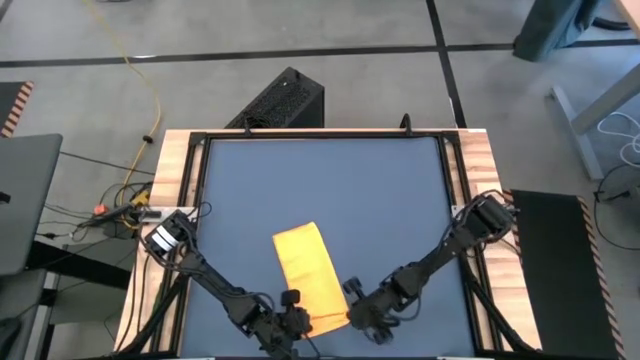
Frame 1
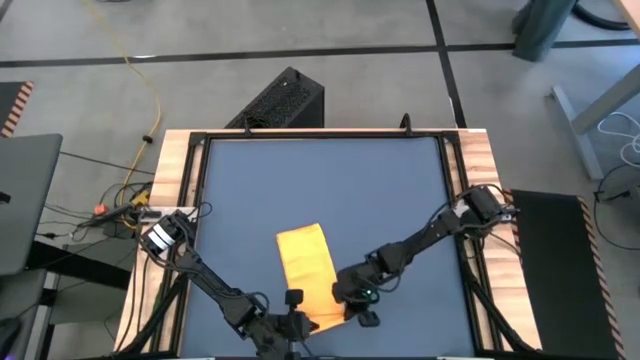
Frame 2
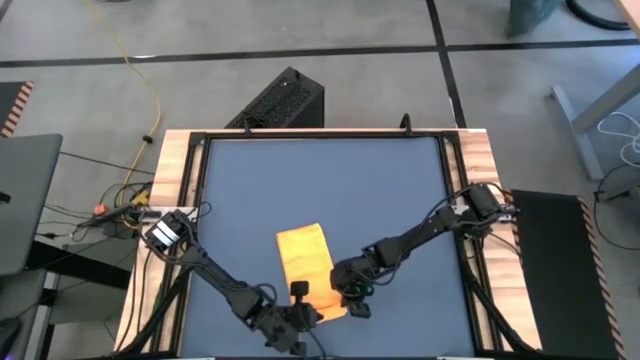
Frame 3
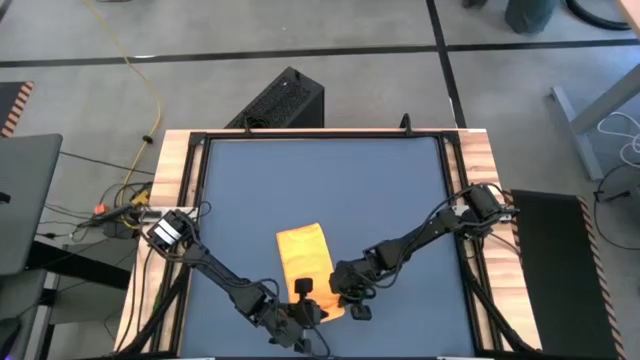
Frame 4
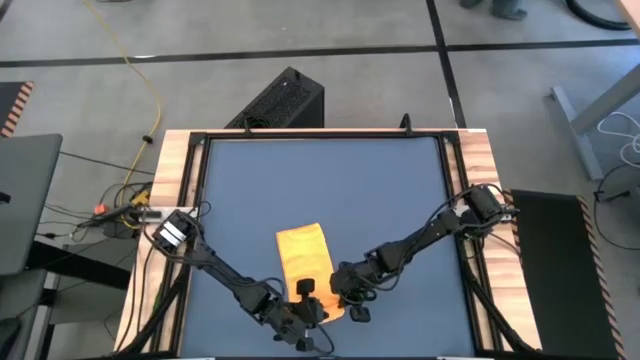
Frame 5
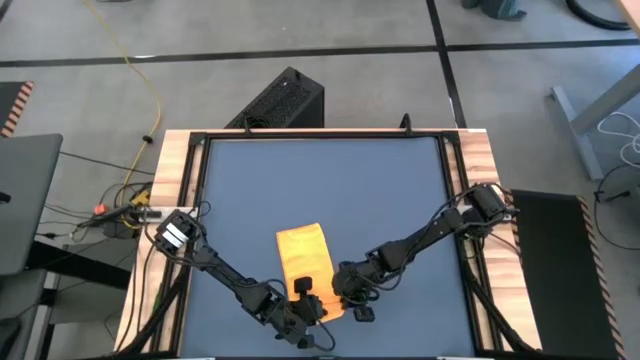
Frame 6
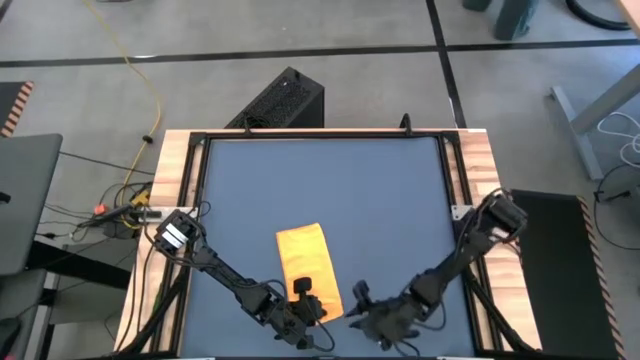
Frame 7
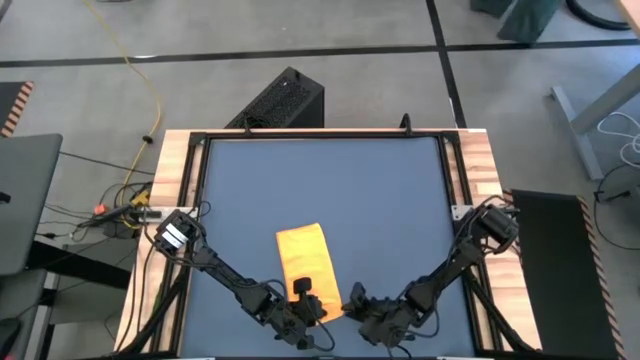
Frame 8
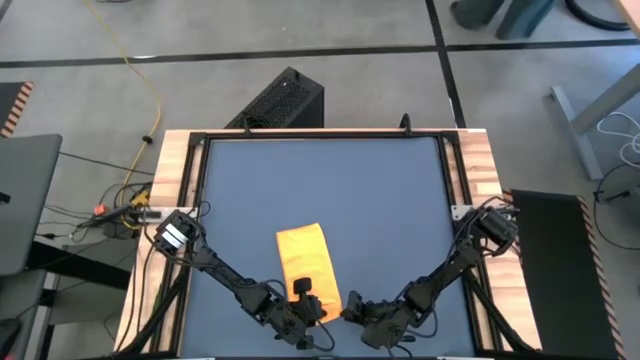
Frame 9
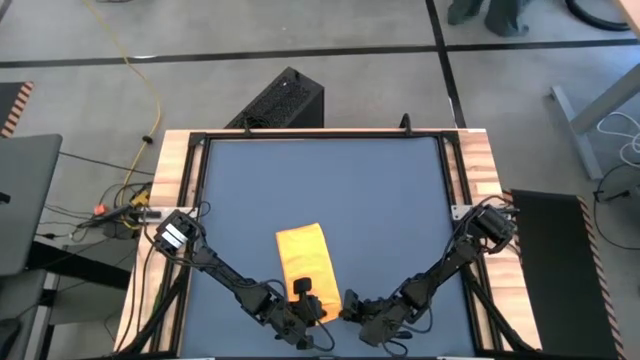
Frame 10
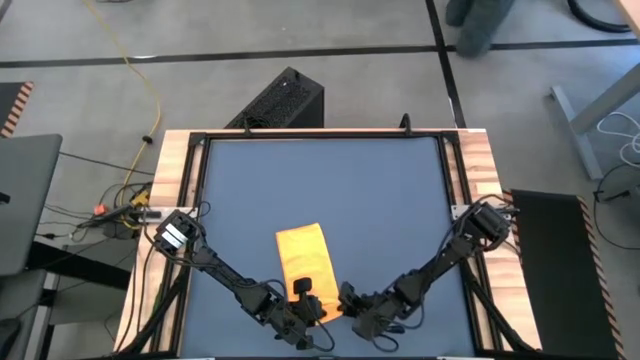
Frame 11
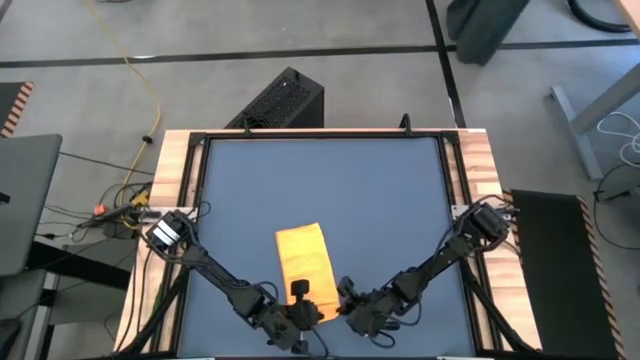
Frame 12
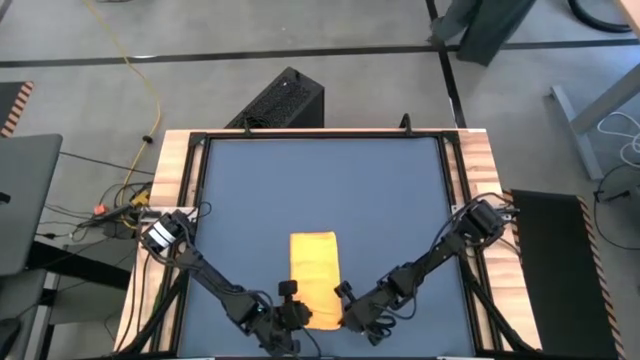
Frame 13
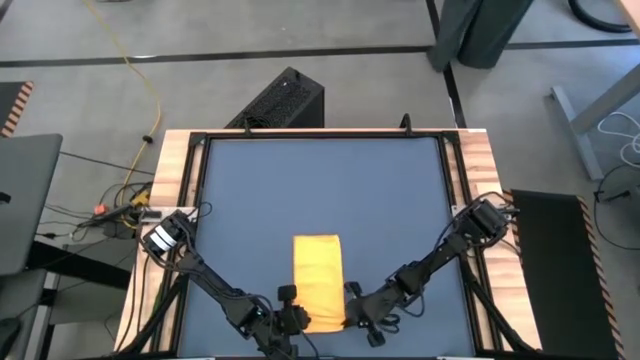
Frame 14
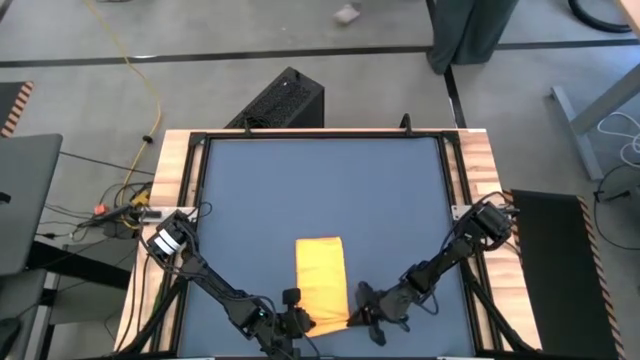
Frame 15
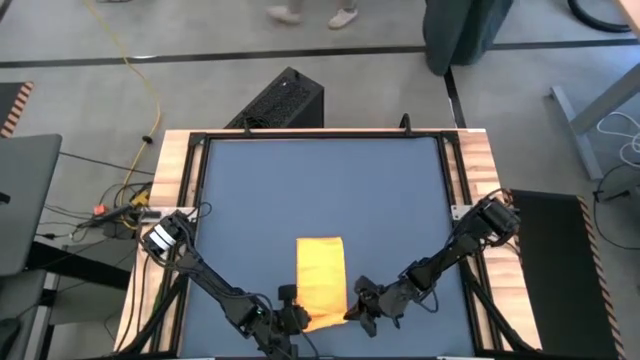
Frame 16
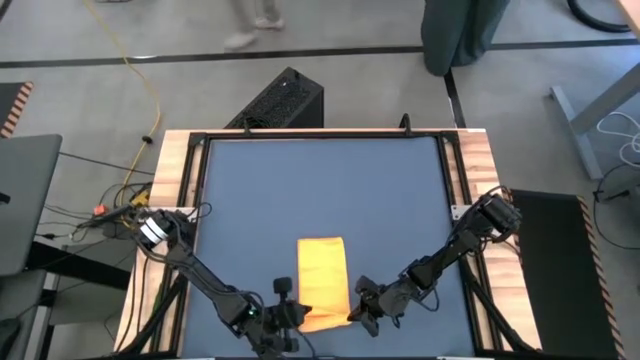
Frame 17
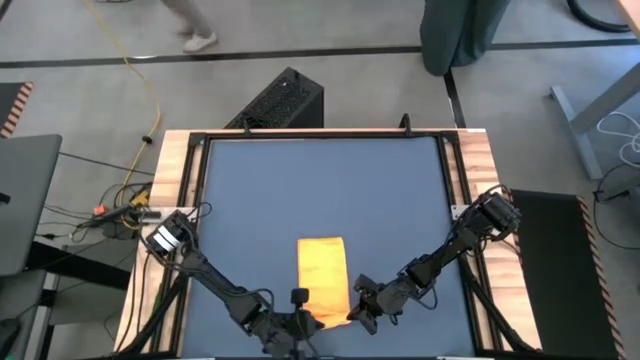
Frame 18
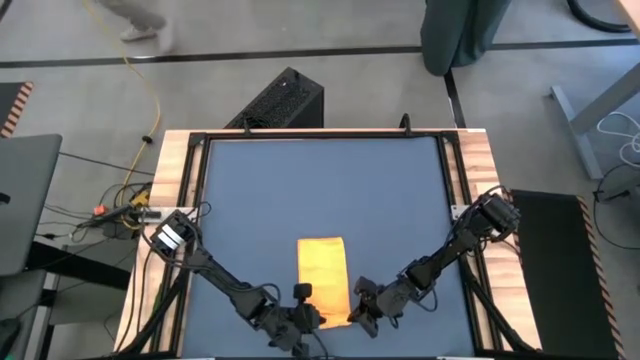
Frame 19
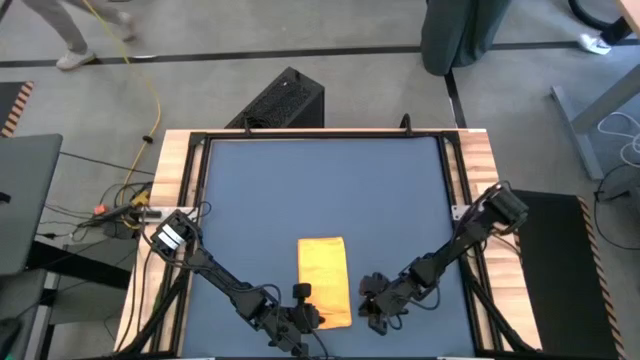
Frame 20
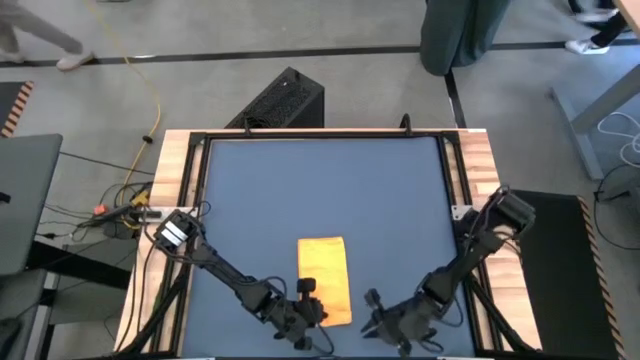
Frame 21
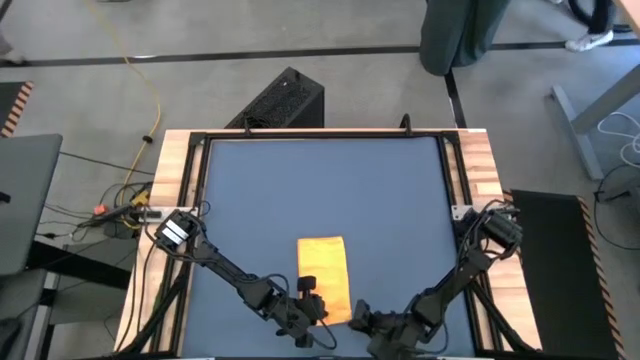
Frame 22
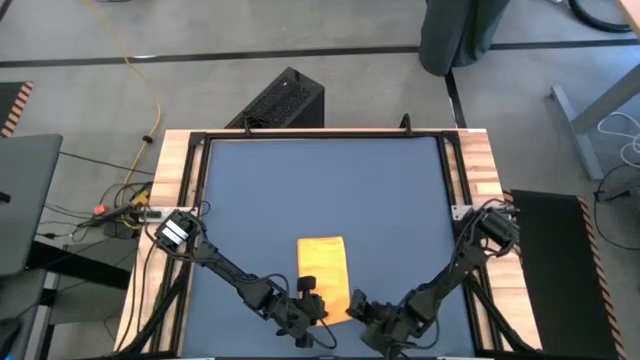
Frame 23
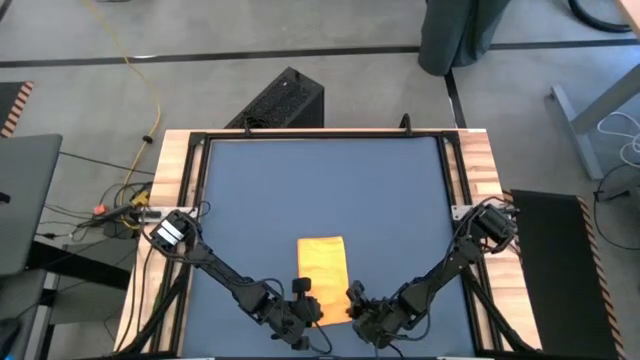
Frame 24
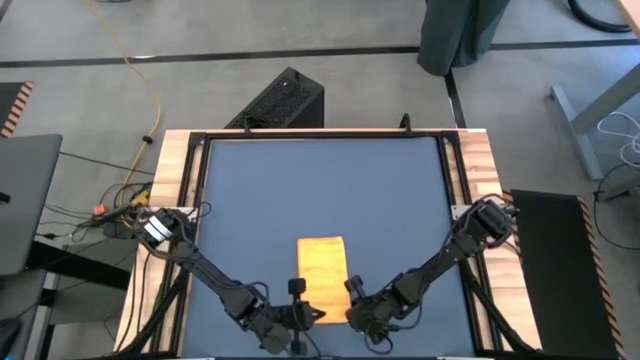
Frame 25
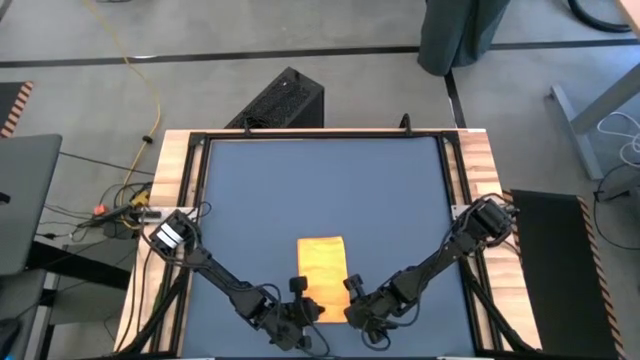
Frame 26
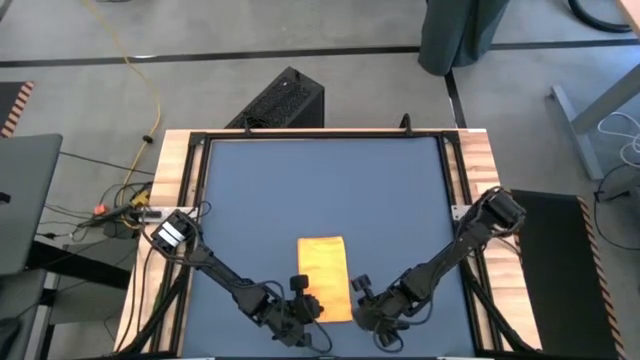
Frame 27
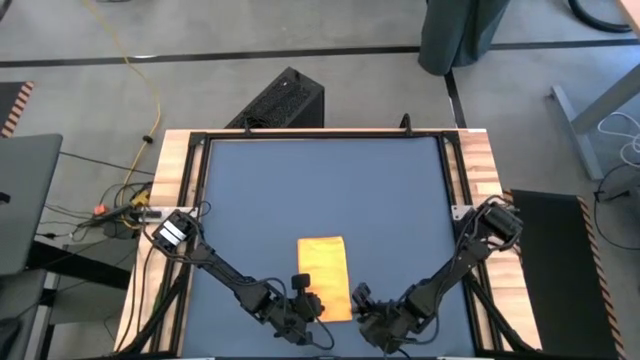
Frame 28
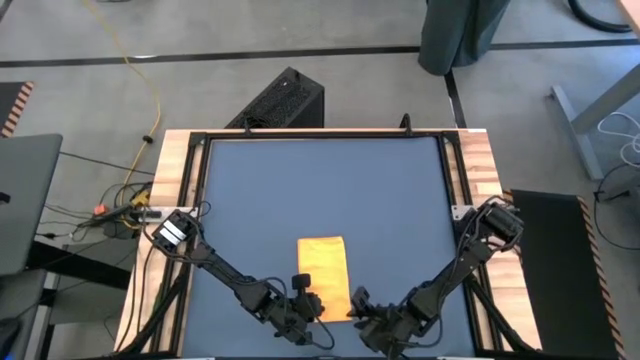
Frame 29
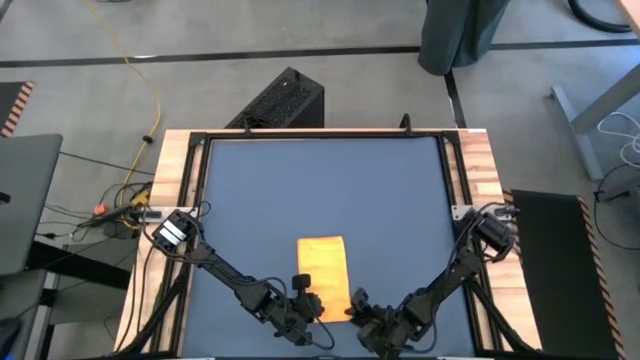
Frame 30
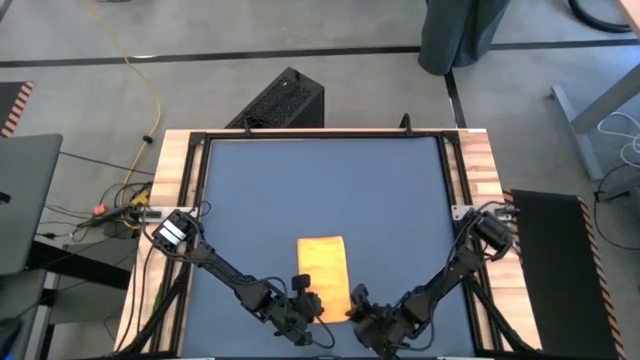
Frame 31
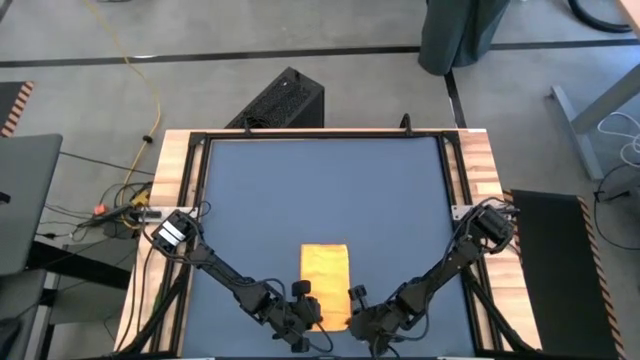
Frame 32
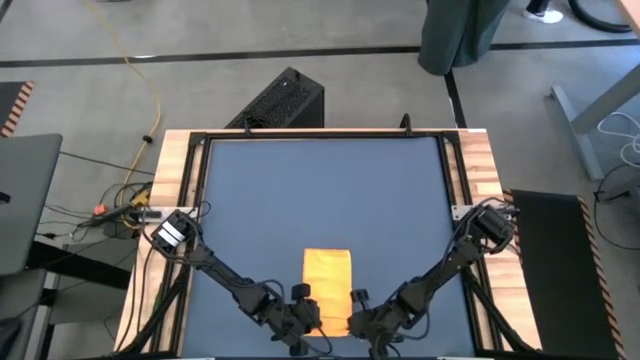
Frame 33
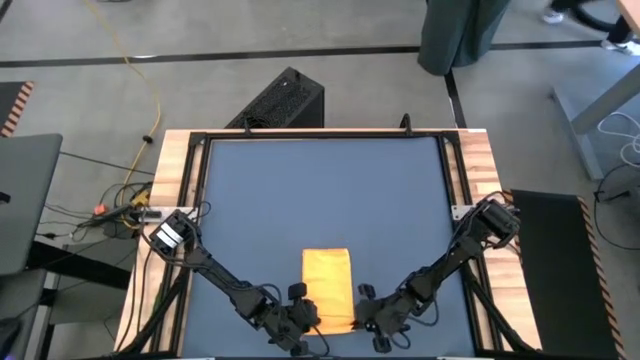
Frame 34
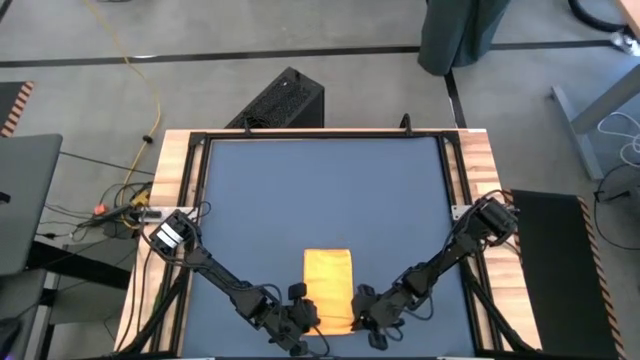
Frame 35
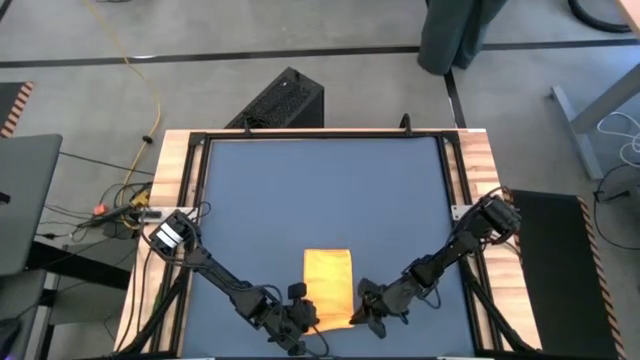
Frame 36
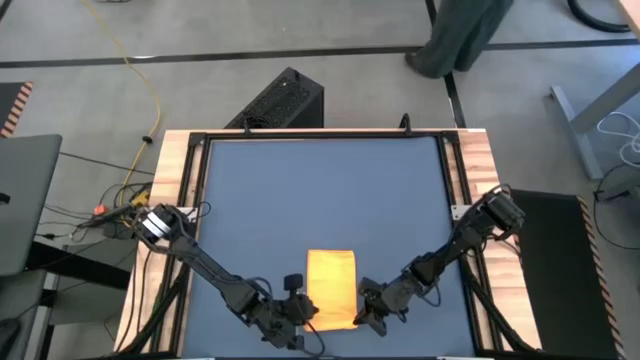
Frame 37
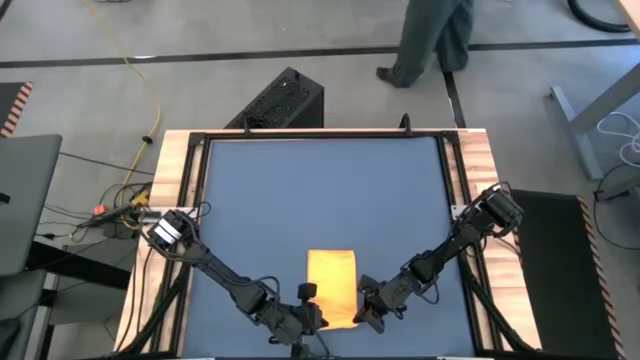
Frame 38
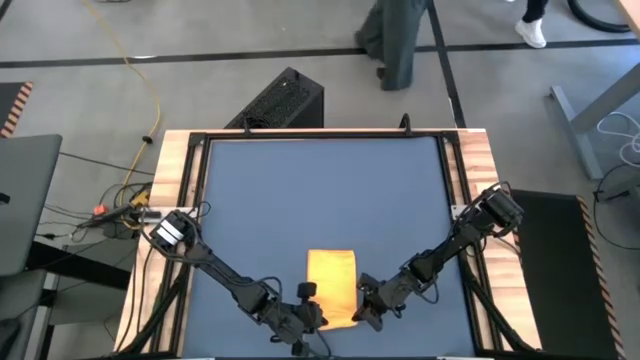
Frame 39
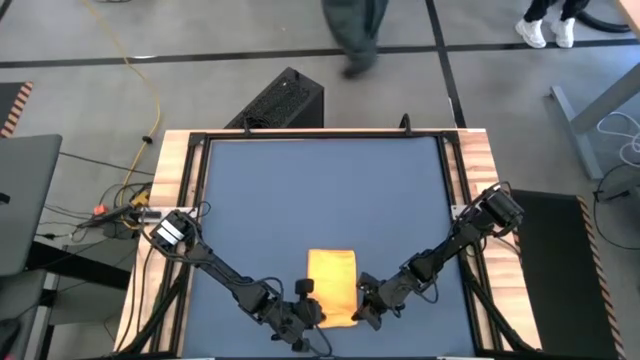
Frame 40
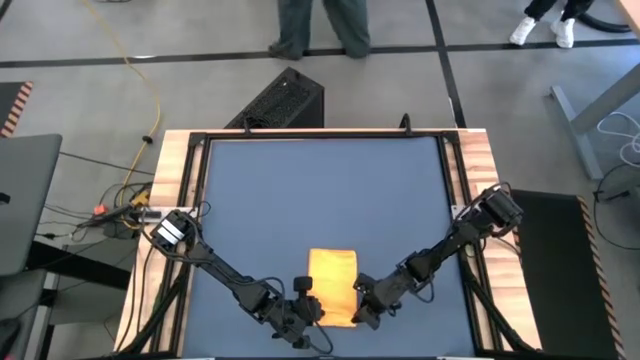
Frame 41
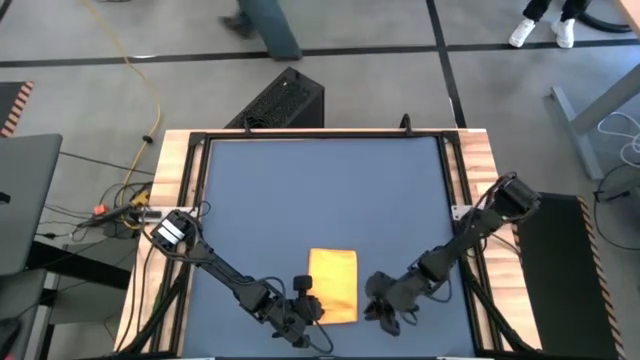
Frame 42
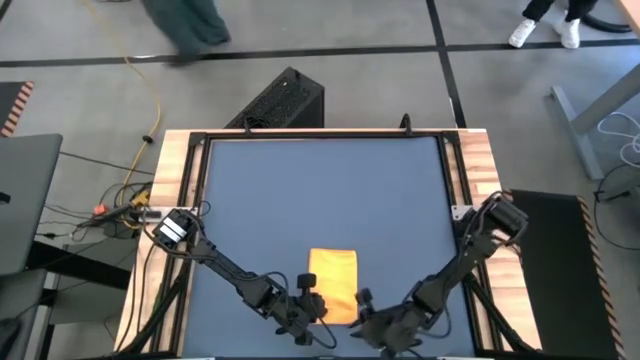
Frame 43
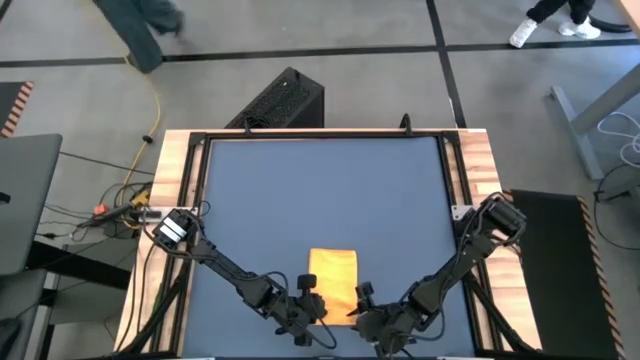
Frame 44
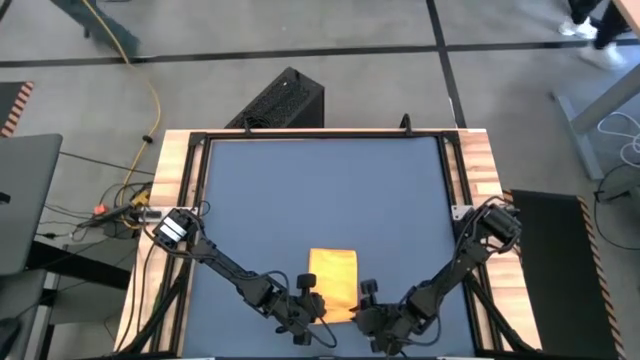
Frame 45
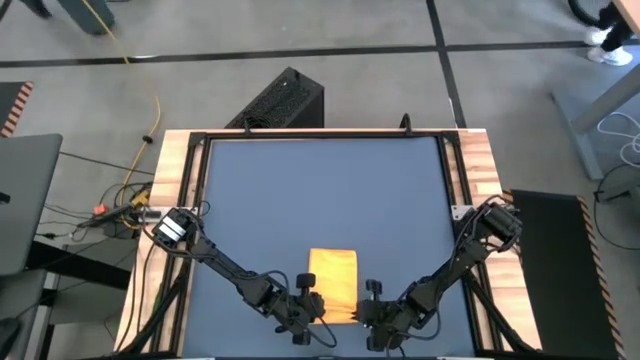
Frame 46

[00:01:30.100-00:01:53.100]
Task: Roll towel into tight, uniform cylinder
Roll the orange microfiber towel
